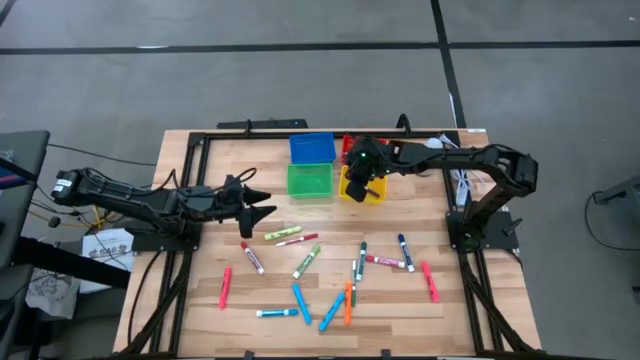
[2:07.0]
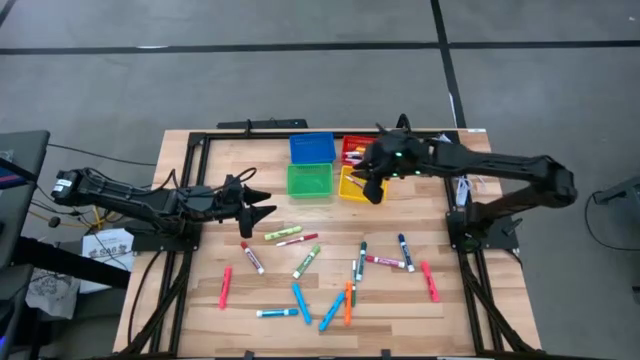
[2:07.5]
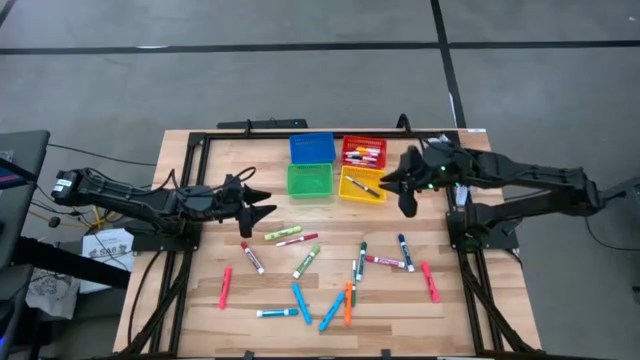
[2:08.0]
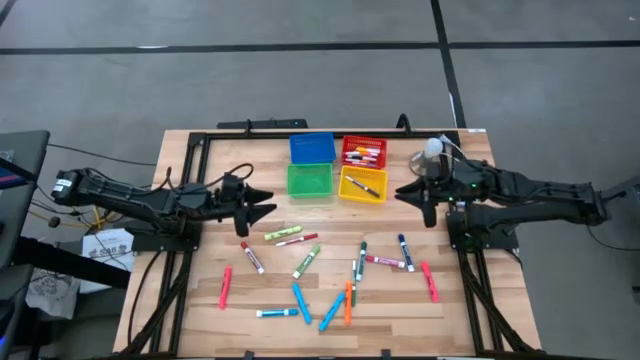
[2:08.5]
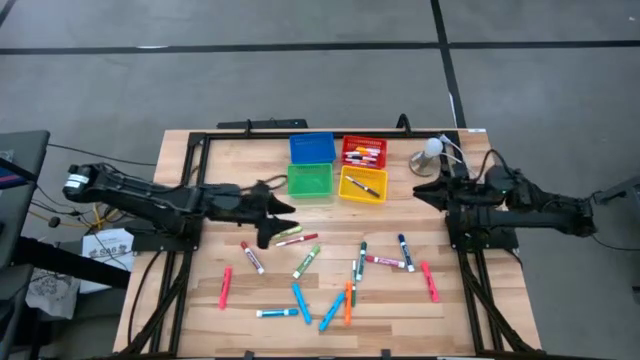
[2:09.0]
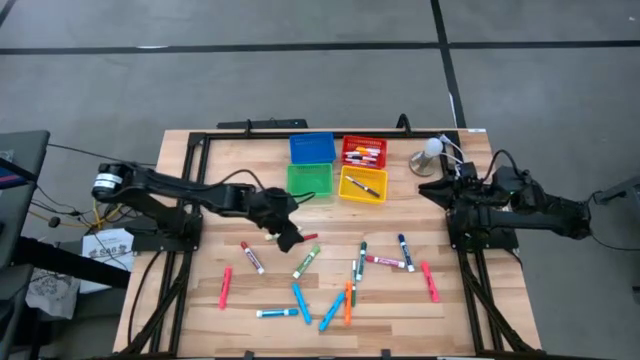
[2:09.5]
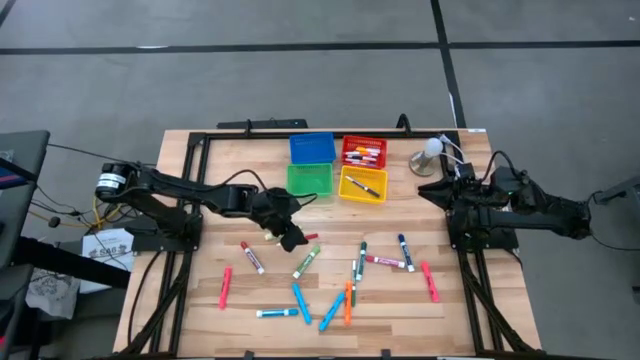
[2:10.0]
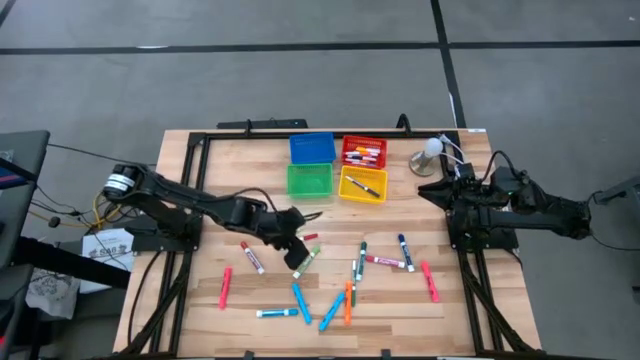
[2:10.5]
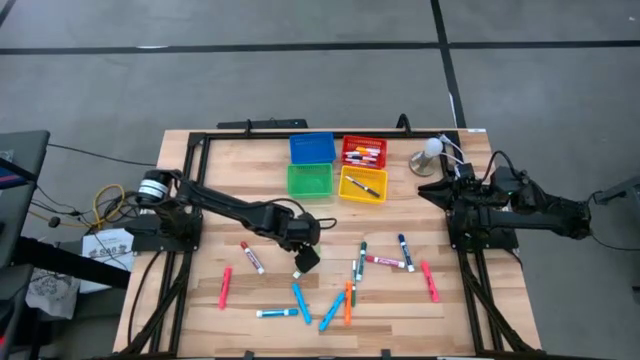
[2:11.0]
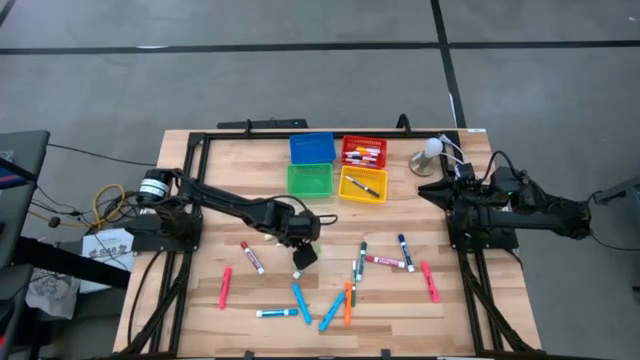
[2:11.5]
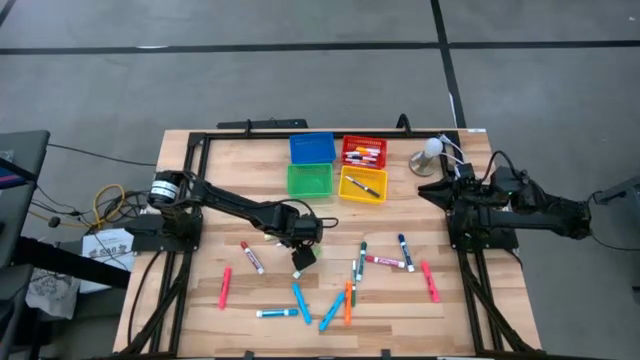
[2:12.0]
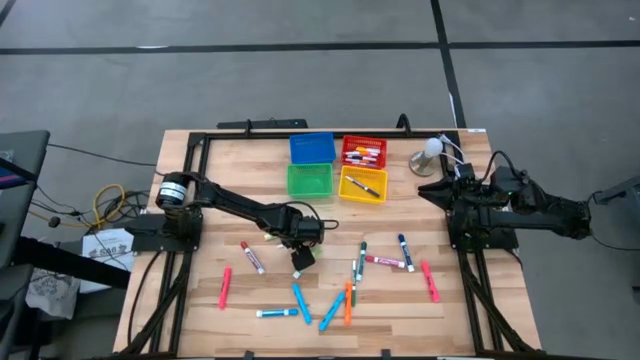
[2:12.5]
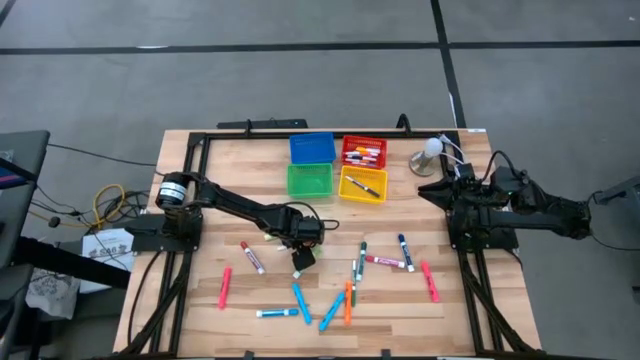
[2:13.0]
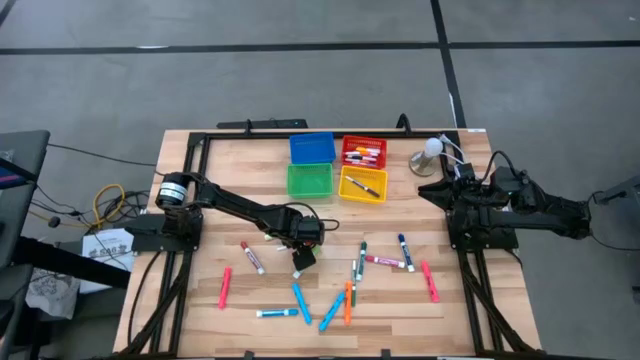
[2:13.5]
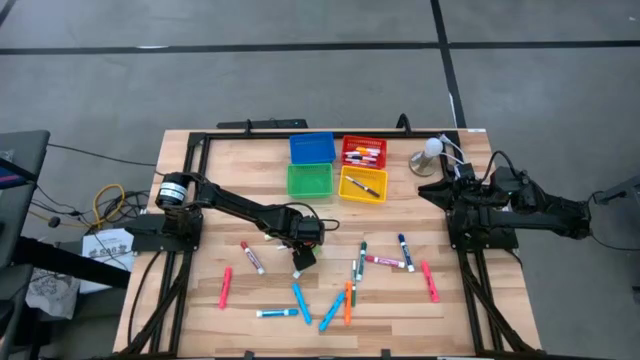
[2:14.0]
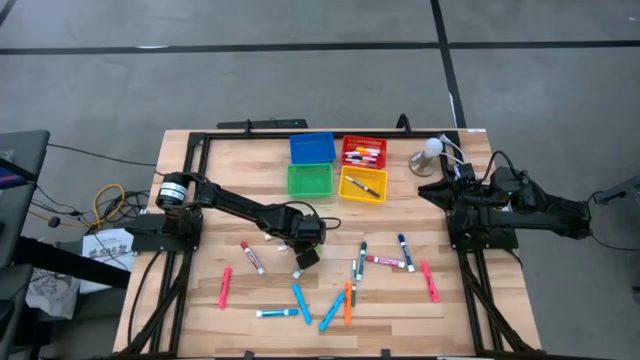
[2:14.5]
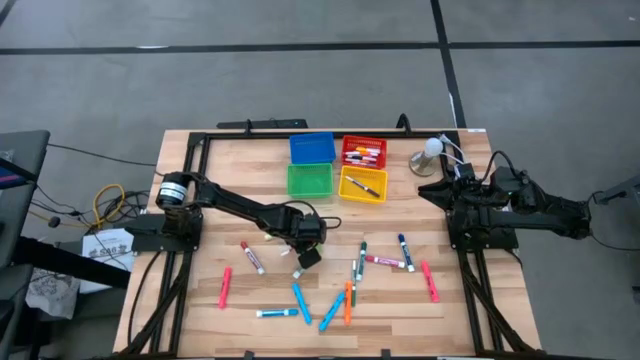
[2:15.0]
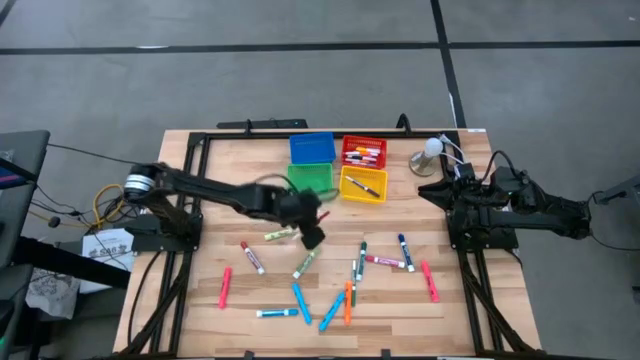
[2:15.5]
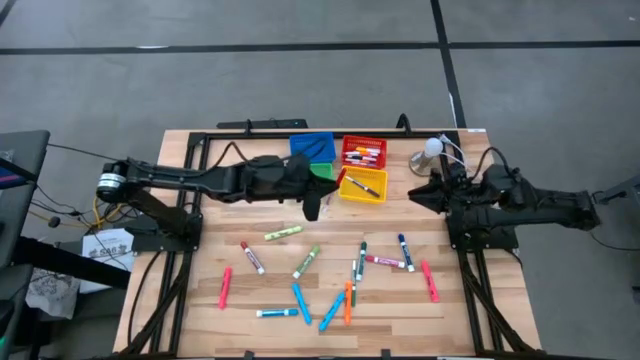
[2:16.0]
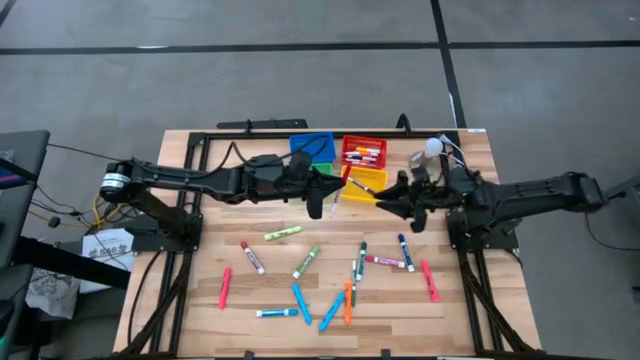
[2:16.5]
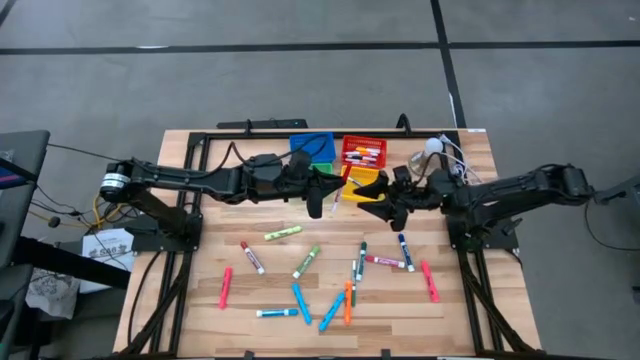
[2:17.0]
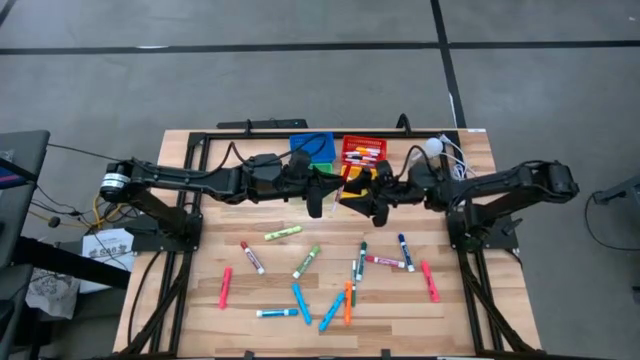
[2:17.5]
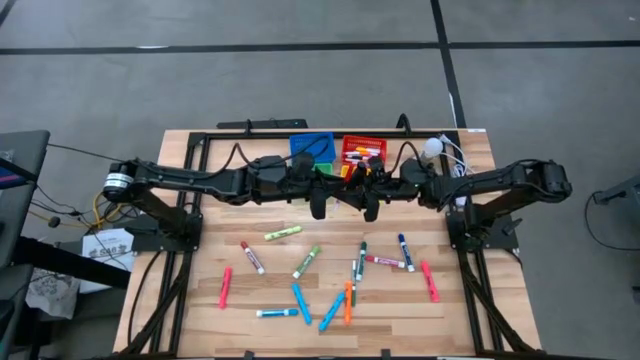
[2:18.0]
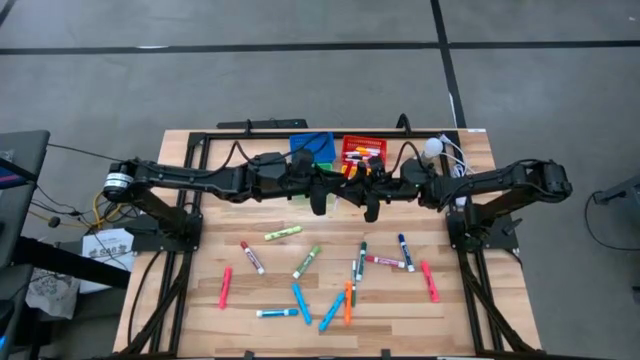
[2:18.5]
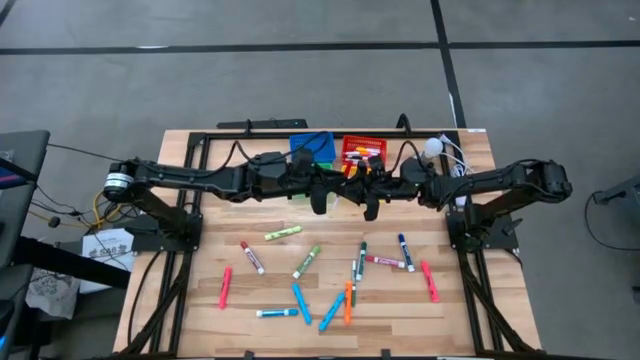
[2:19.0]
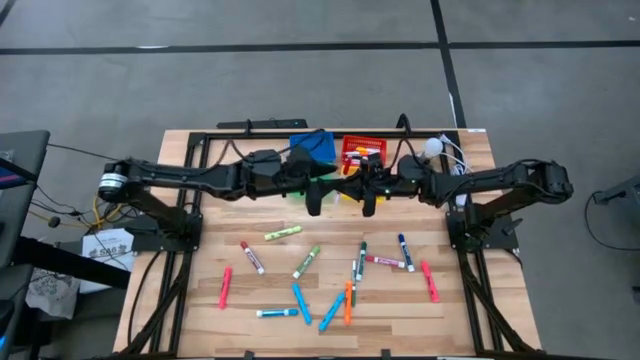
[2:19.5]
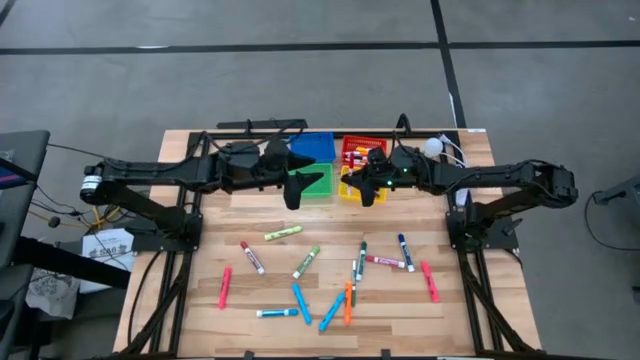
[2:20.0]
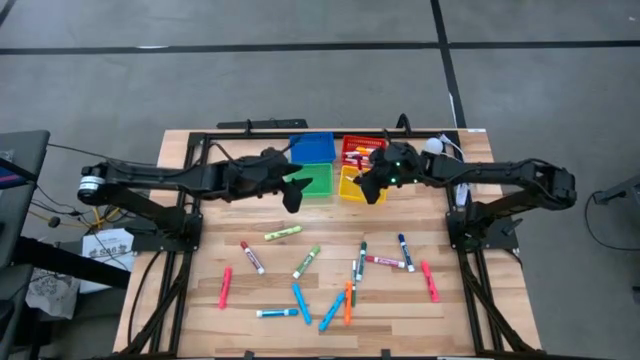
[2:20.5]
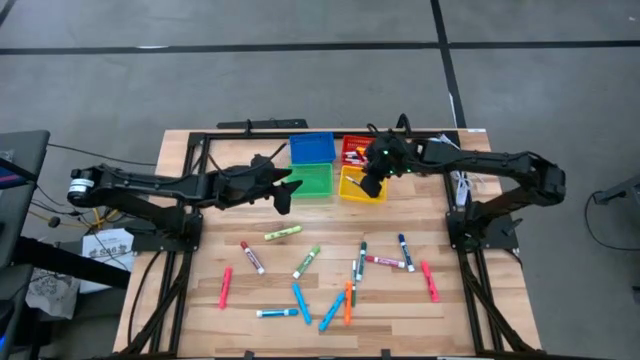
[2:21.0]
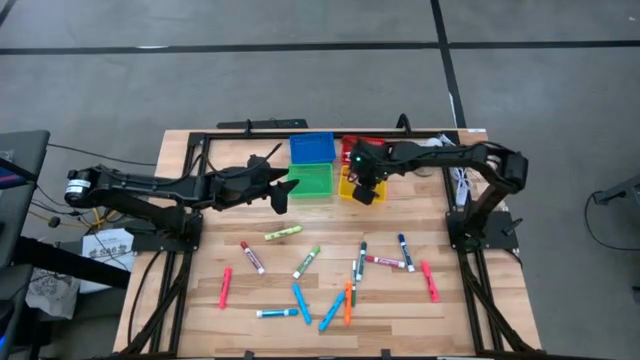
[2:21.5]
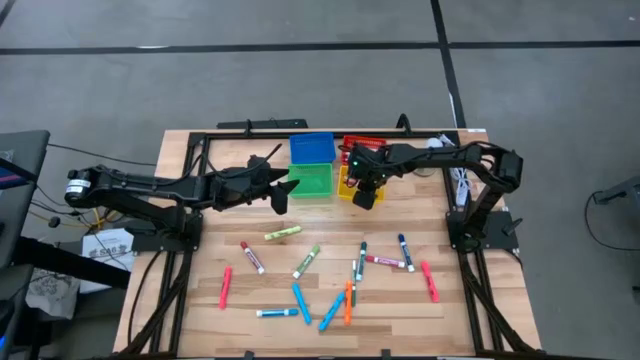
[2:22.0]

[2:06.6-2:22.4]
Task: Pick & Place Markers
Put the red marker into the yellow bin

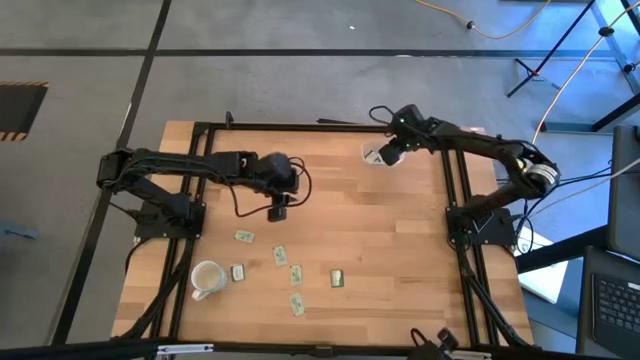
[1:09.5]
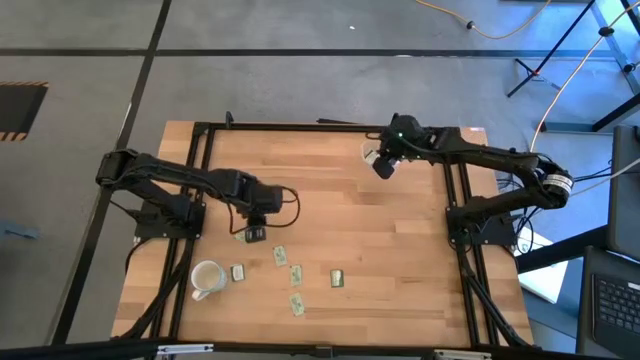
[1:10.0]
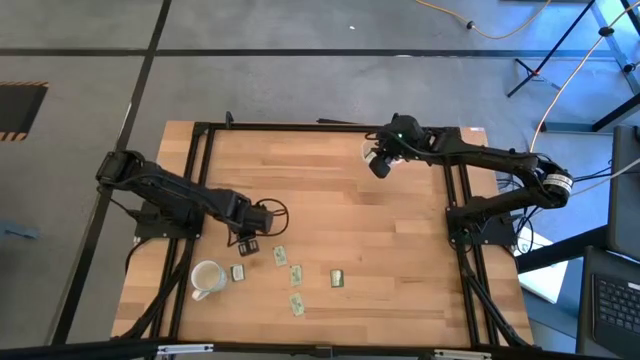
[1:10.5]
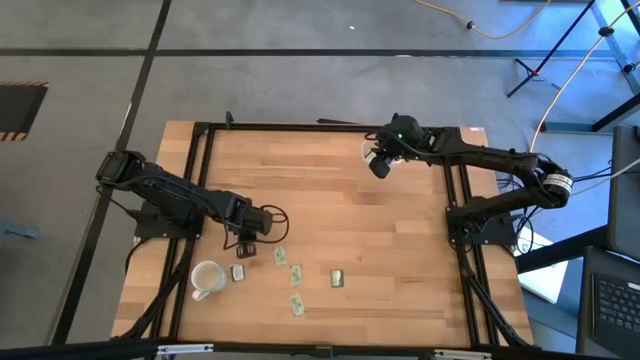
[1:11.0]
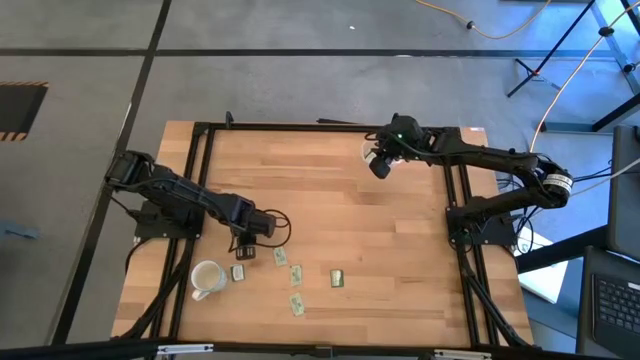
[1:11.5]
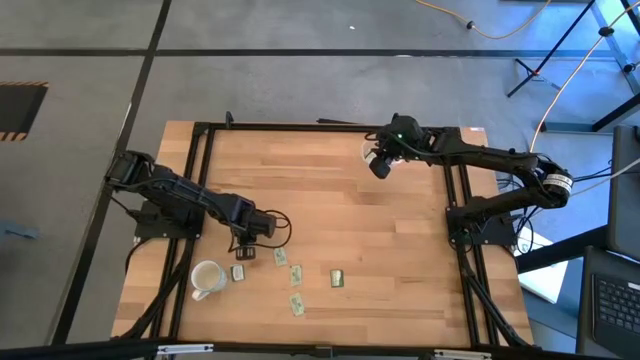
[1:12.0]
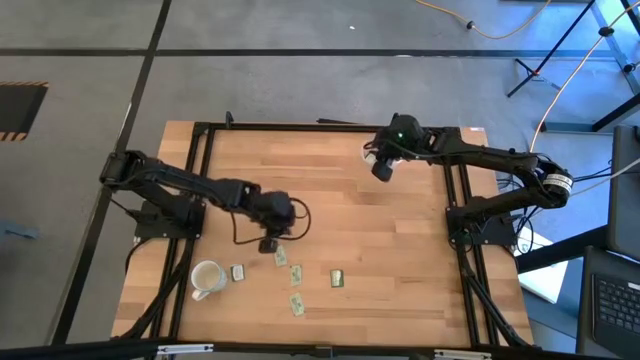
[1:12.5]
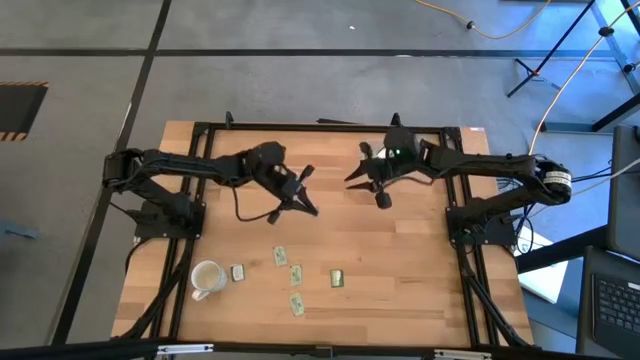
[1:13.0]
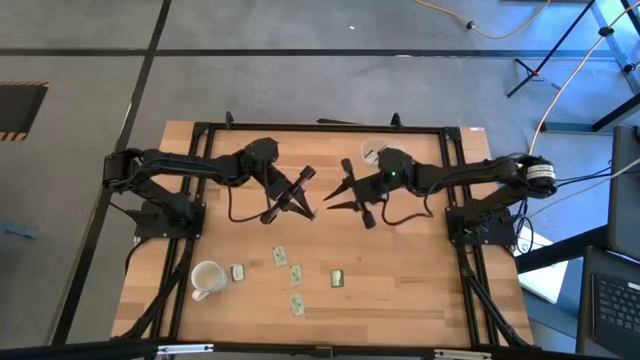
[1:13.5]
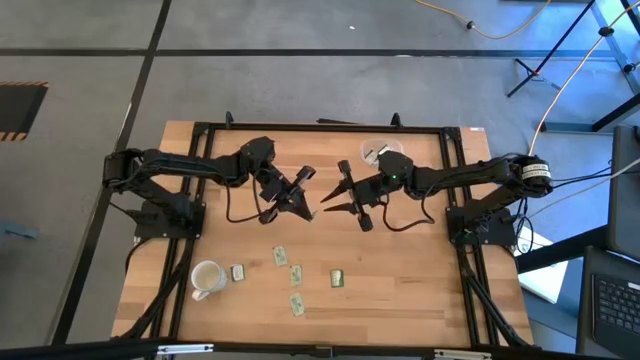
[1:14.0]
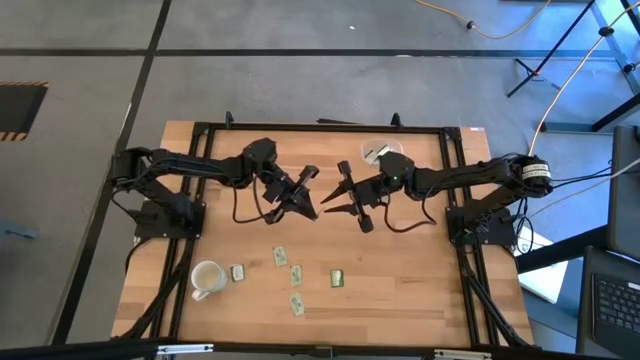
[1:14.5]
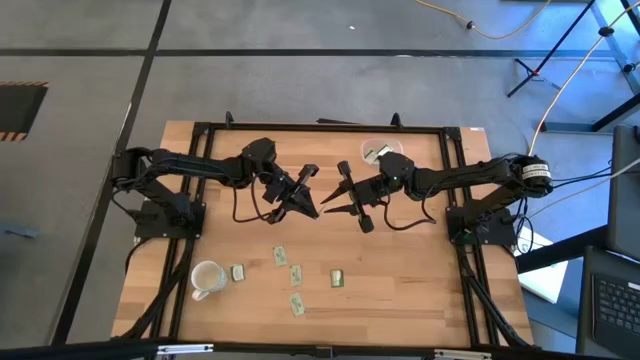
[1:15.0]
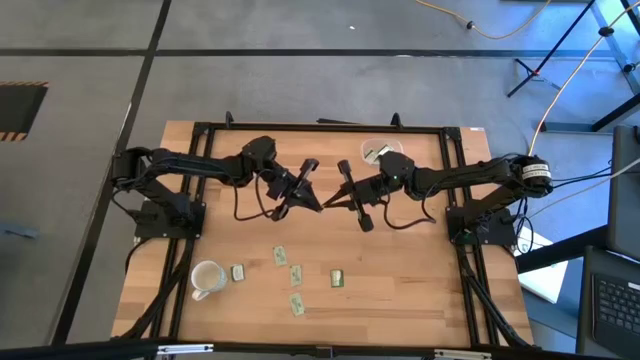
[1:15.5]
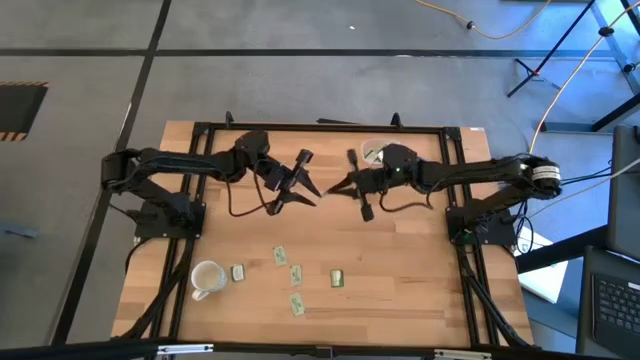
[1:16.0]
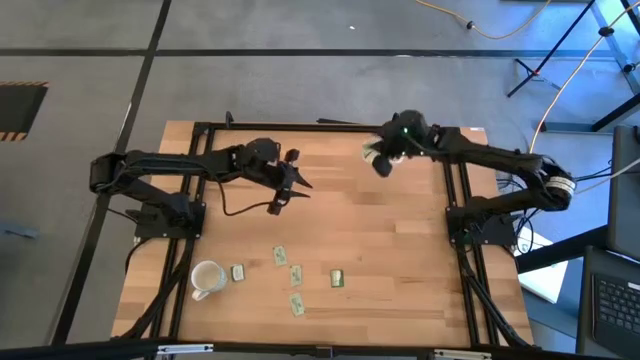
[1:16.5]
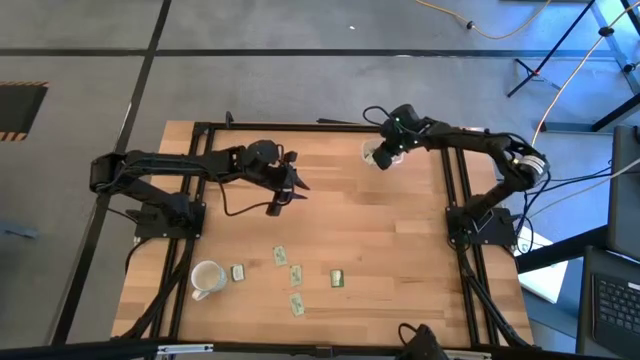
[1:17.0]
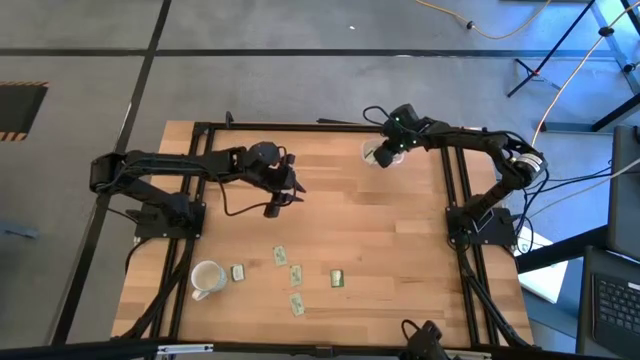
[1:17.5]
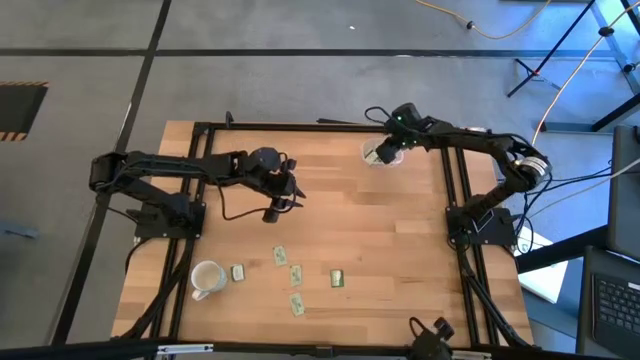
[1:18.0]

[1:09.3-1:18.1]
Task: Pick and place Stevia / Truvia into bins
Put the green stevia packet into the transparent container
